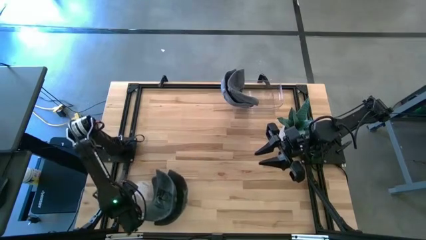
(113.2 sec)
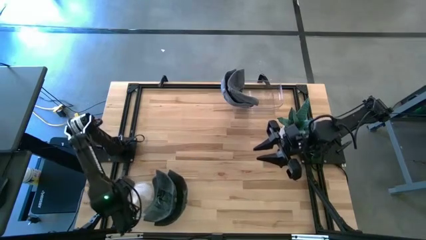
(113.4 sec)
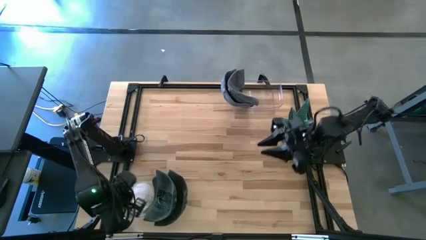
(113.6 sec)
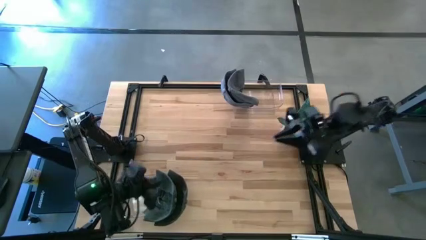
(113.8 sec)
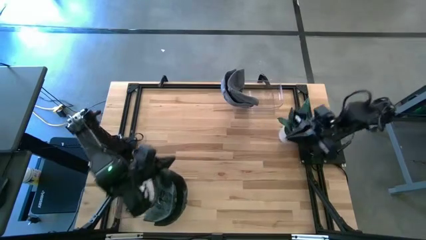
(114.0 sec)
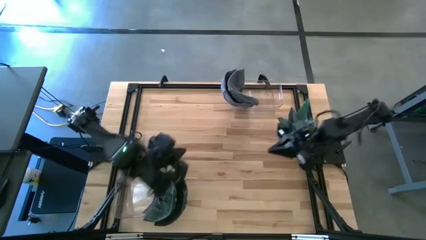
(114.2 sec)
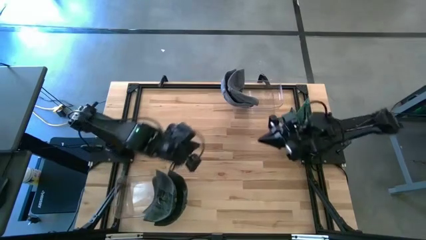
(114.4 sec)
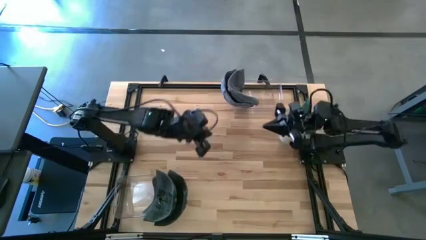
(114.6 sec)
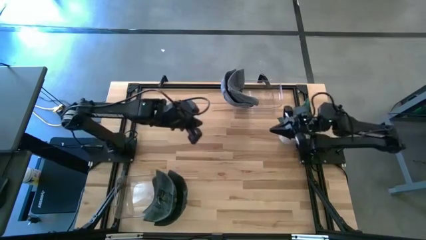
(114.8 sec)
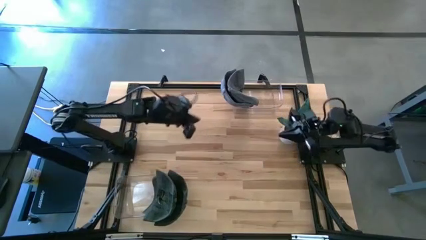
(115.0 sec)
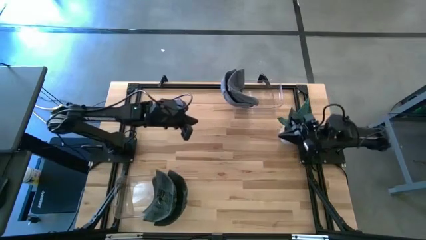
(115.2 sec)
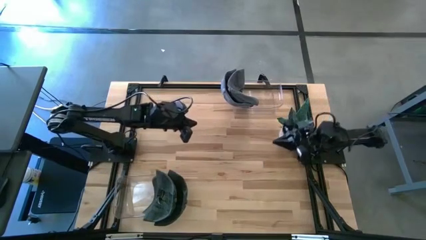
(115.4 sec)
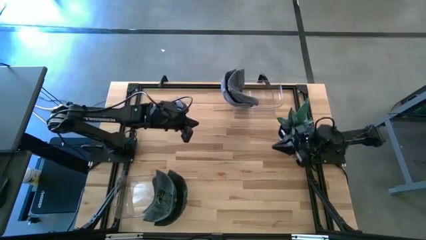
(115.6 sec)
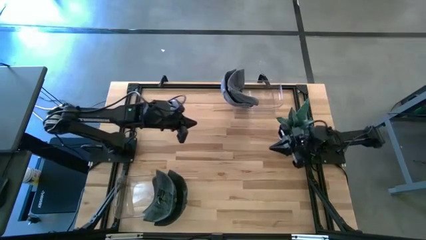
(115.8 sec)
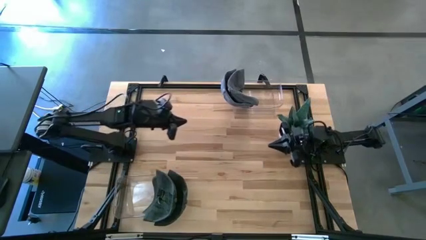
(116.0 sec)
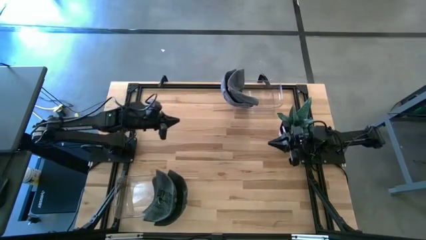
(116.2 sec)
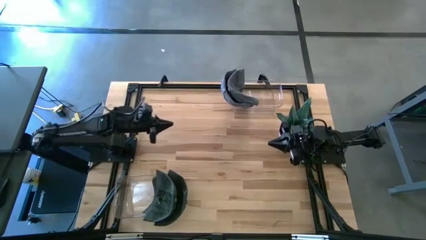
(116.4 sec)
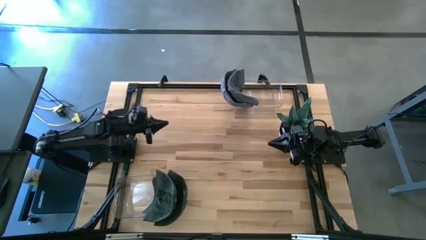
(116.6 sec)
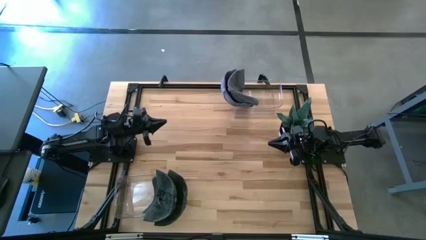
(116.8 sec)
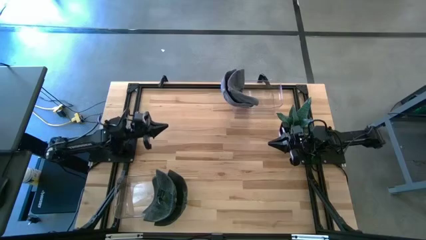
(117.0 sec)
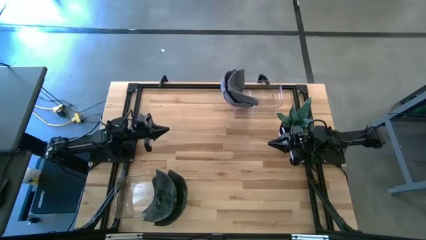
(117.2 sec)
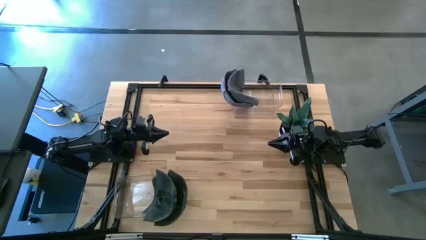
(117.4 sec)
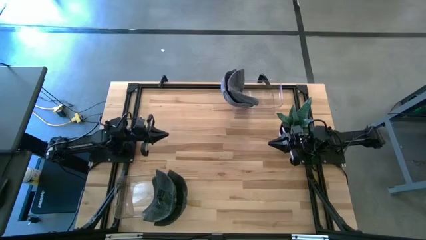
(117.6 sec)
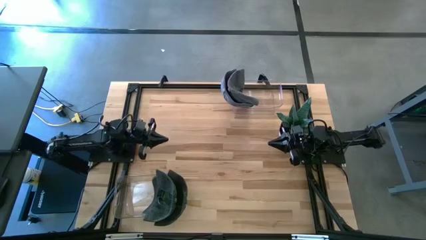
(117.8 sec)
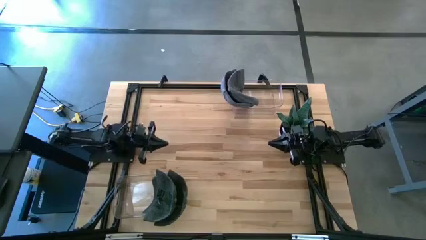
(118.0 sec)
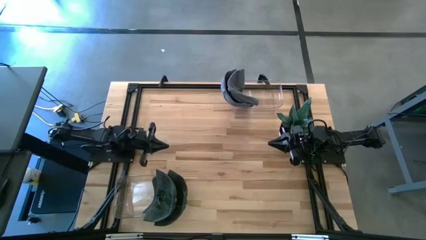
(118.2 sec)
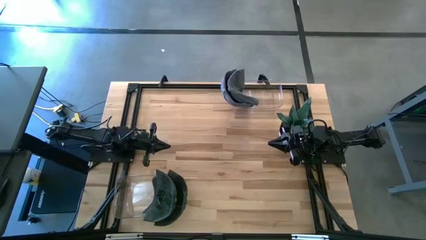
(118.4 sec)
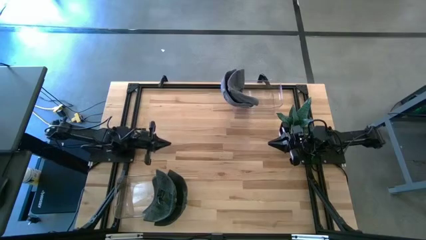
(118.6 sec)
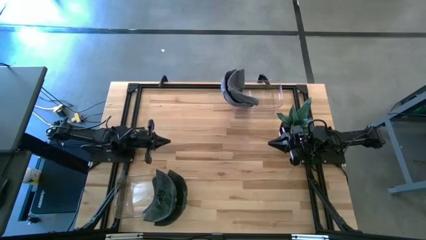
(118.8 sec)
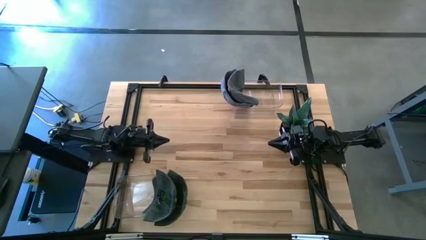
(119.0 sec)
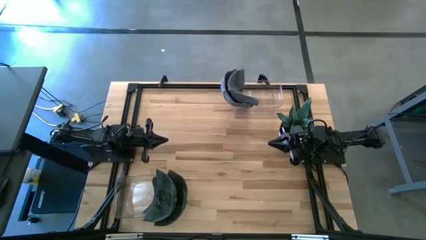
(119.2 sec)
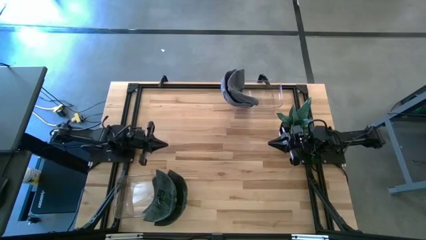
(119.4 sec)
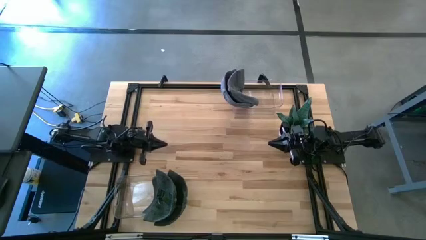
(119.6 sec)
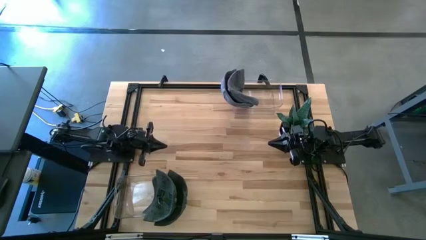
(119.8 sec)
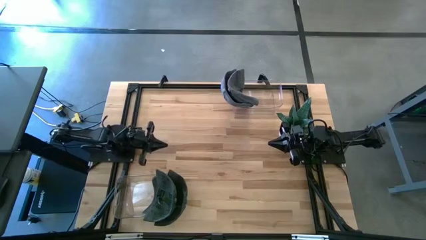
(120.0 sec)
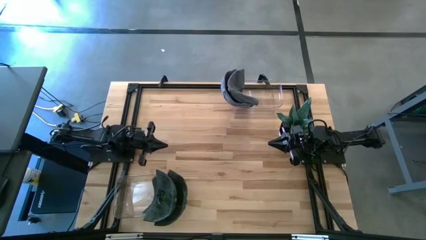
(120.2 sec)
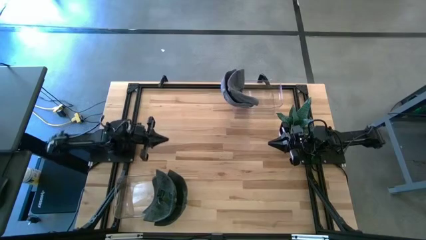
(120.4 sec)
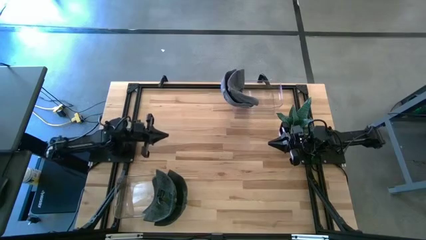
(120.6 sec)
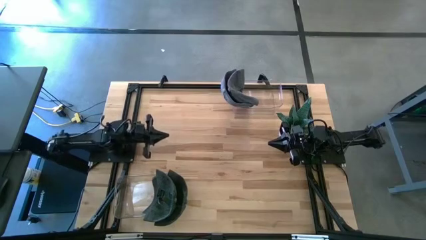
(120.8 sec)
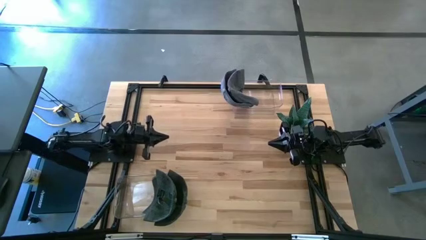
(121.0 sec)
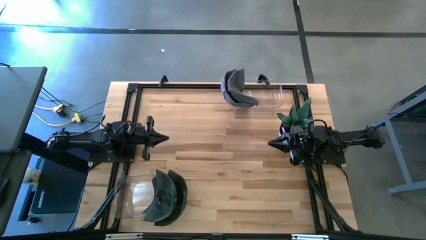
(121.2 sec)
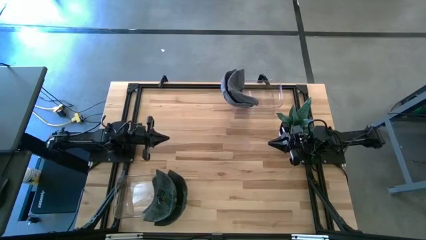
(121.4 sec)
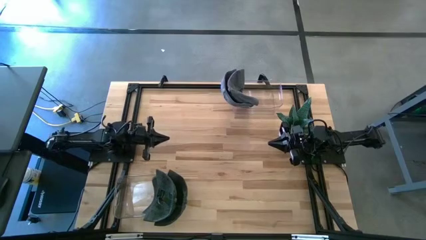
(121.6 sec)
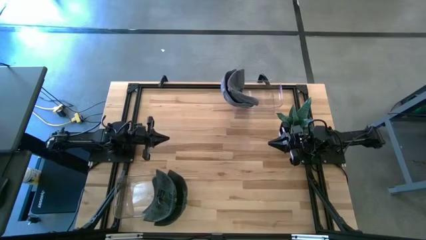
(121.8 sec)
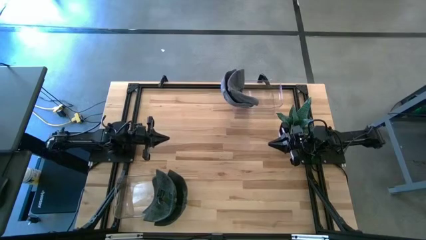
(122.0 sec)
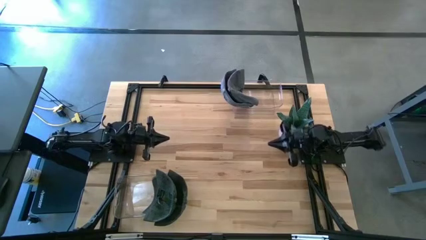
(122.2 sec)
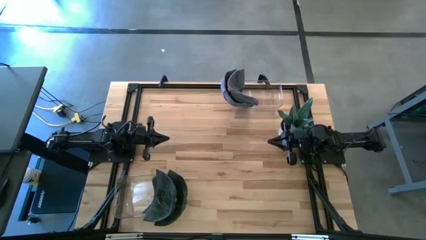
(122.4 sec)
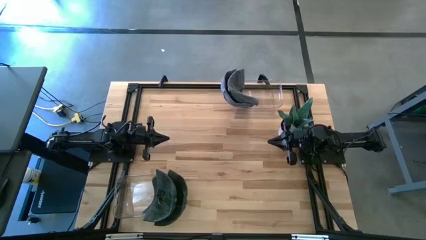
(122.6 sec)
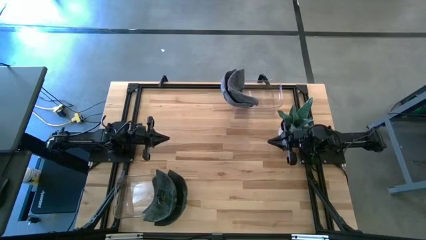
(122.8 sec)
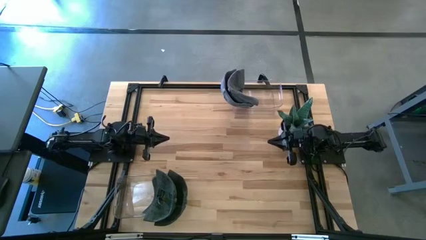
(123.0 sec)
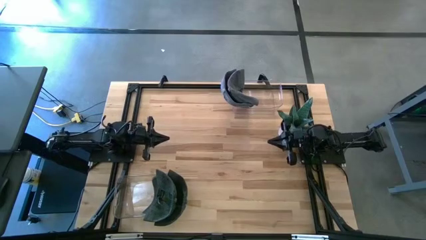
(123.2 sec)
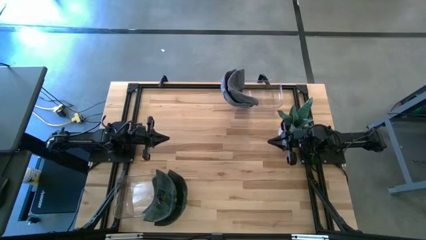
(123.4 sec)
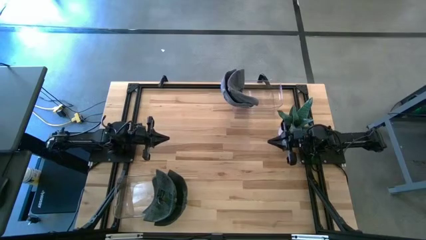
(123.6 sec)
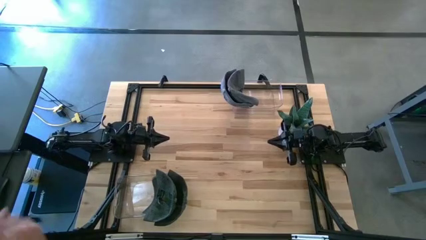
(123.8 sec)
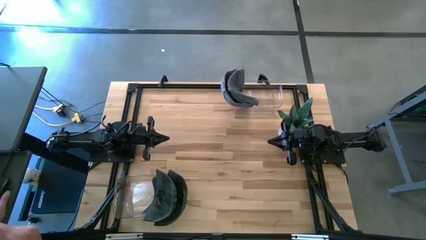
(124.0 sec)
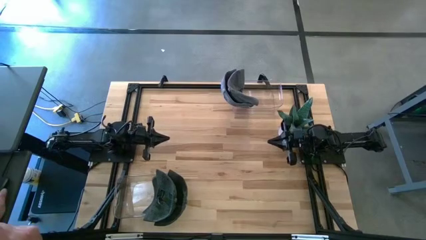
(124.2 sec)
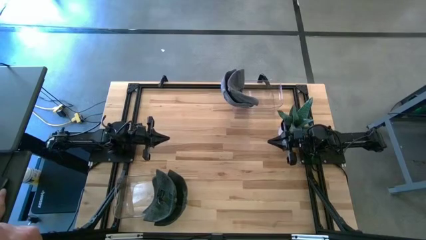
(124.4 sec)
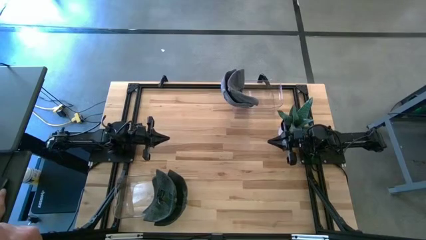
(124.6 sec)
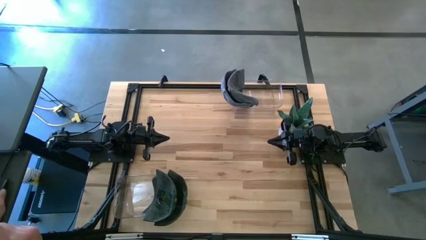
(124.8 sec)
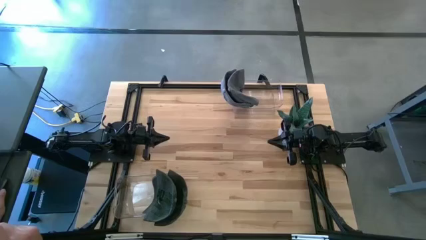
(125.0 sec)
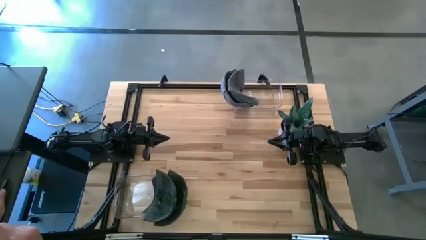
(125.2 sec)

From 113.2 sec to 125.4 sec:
Task: Pick & Place hat
Return to Home Position
